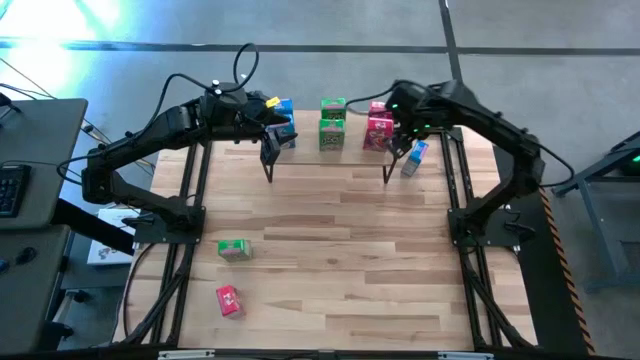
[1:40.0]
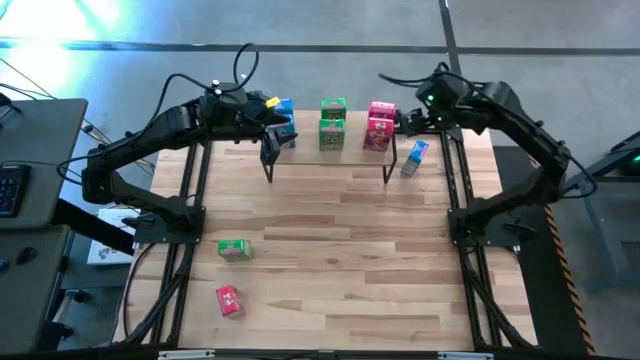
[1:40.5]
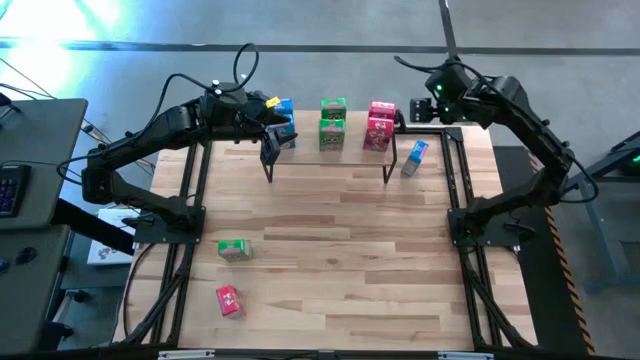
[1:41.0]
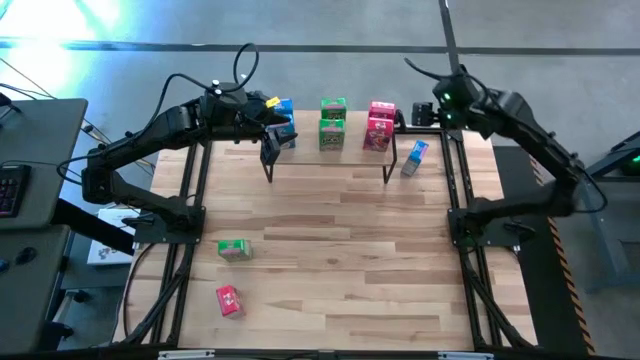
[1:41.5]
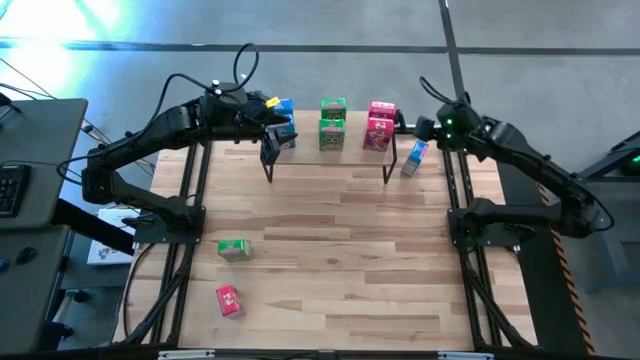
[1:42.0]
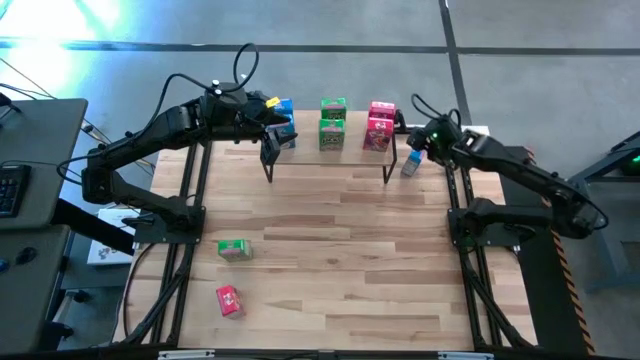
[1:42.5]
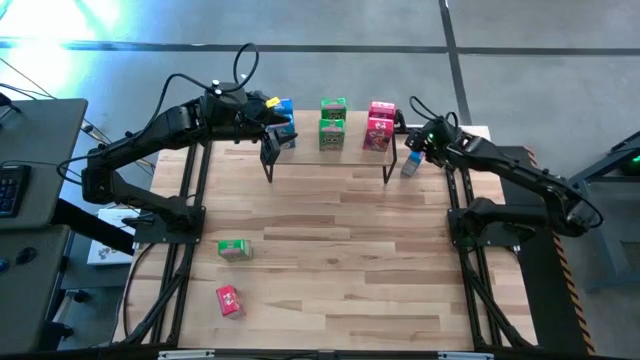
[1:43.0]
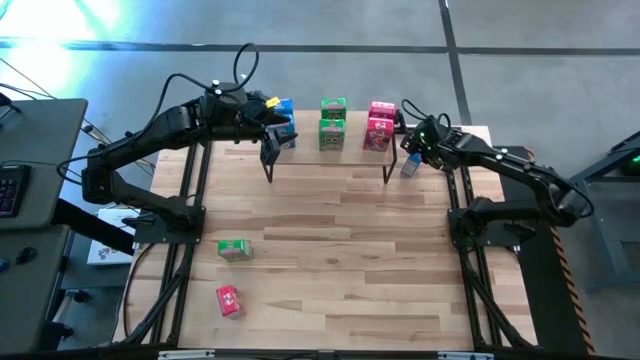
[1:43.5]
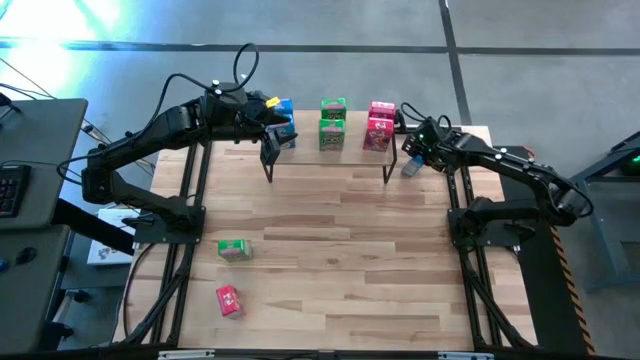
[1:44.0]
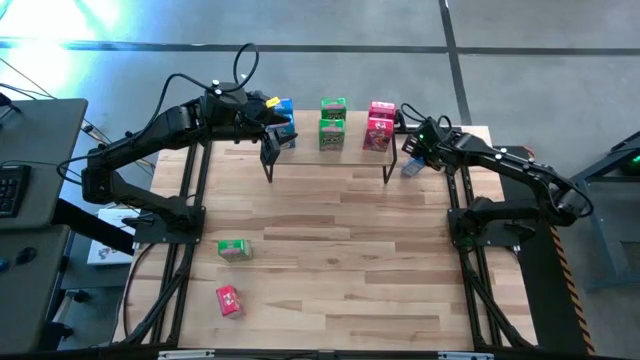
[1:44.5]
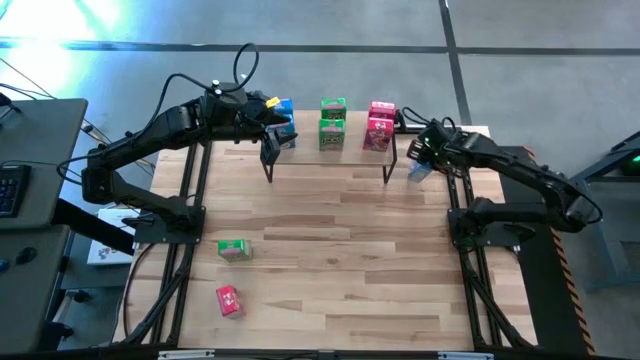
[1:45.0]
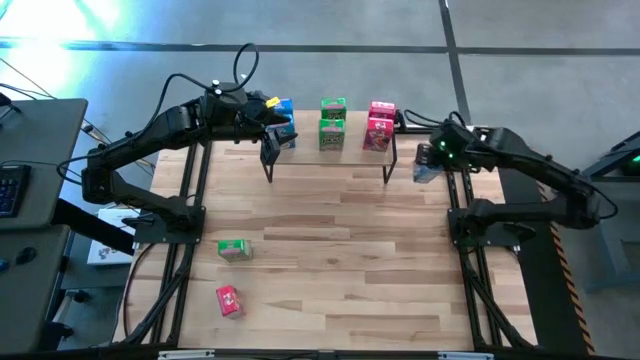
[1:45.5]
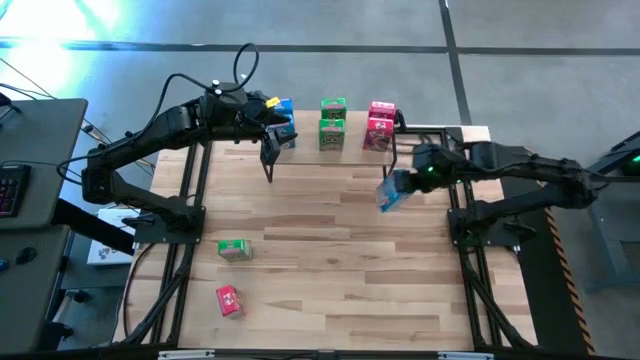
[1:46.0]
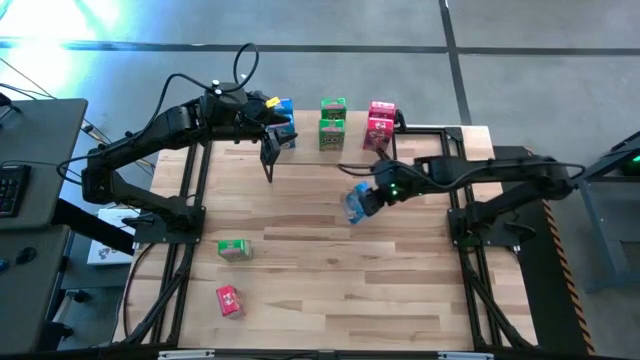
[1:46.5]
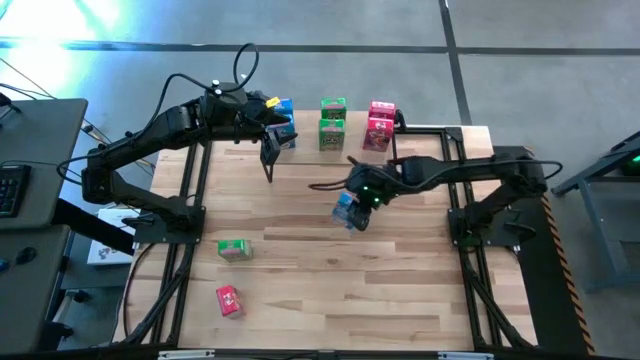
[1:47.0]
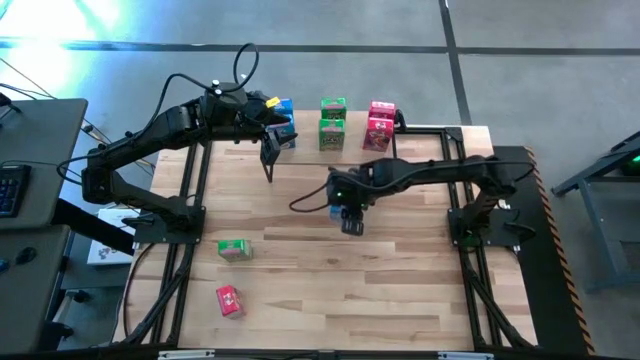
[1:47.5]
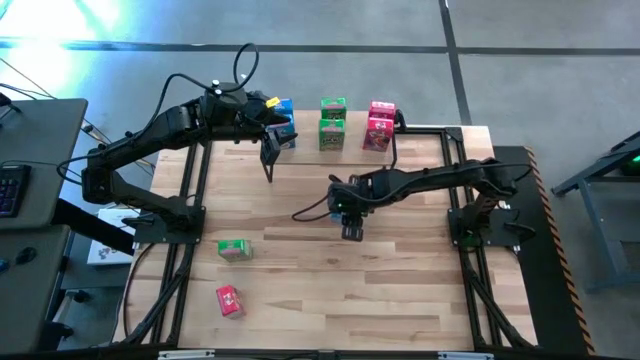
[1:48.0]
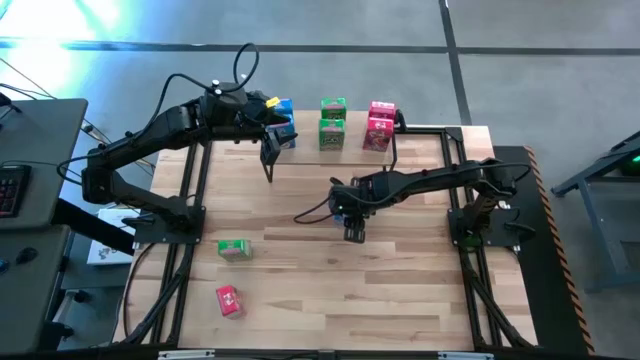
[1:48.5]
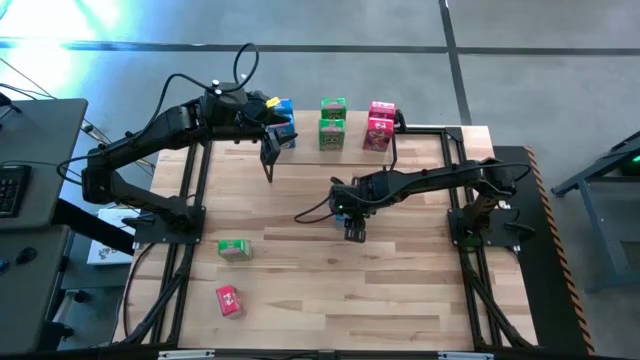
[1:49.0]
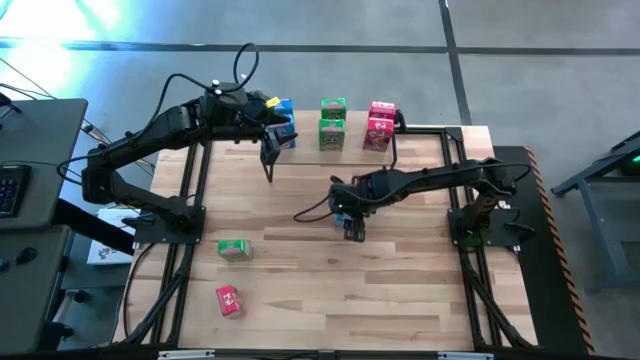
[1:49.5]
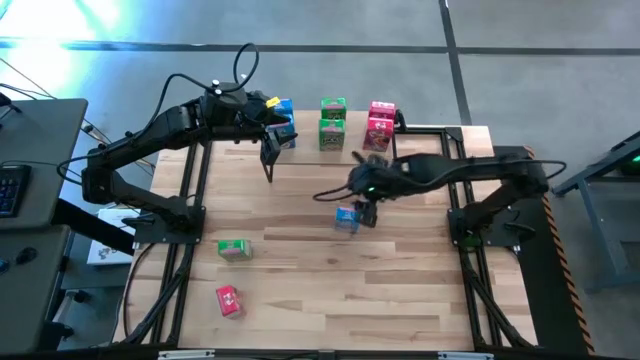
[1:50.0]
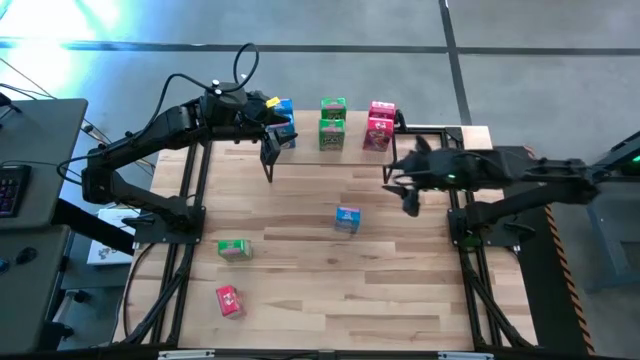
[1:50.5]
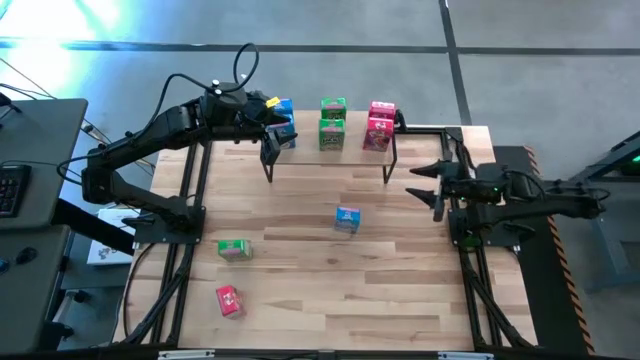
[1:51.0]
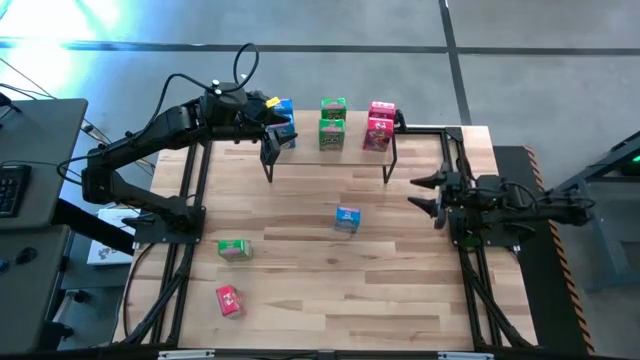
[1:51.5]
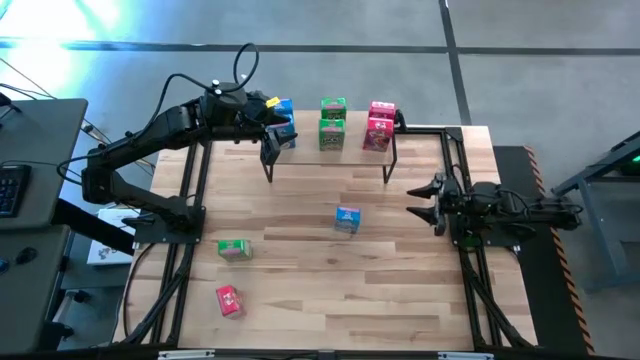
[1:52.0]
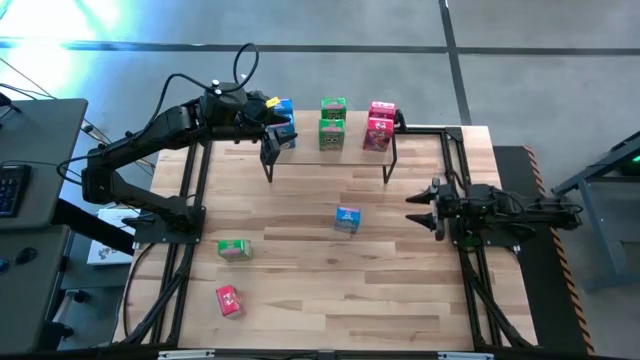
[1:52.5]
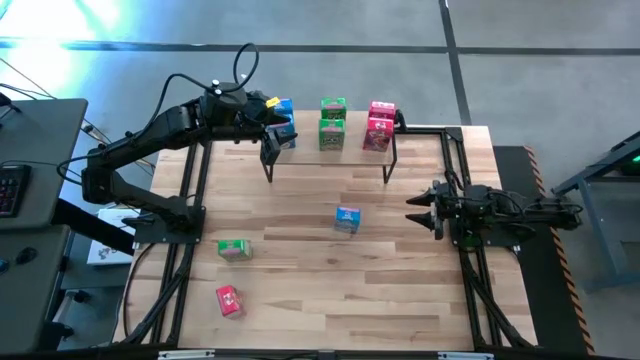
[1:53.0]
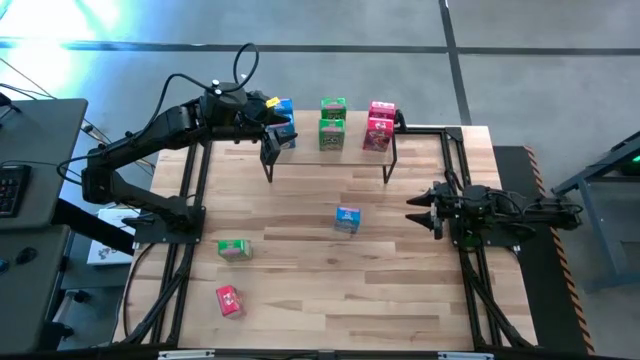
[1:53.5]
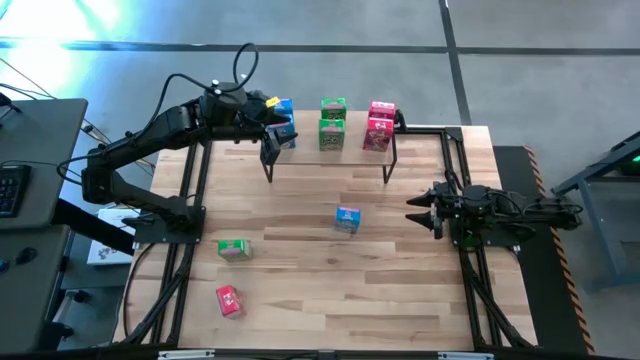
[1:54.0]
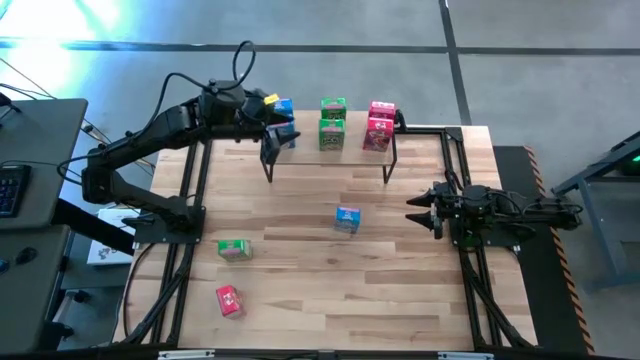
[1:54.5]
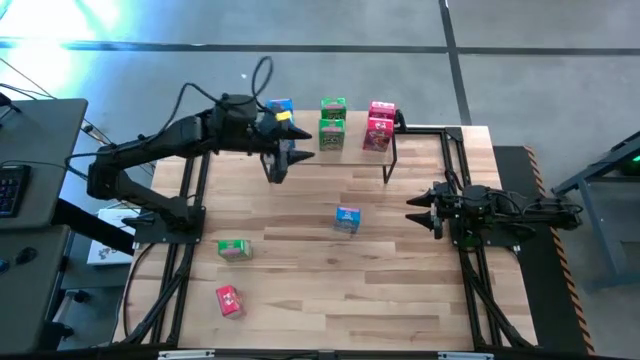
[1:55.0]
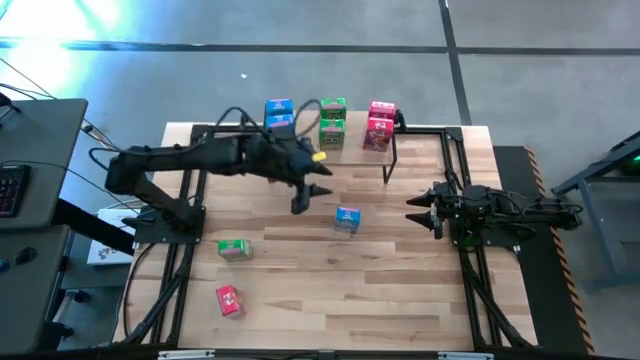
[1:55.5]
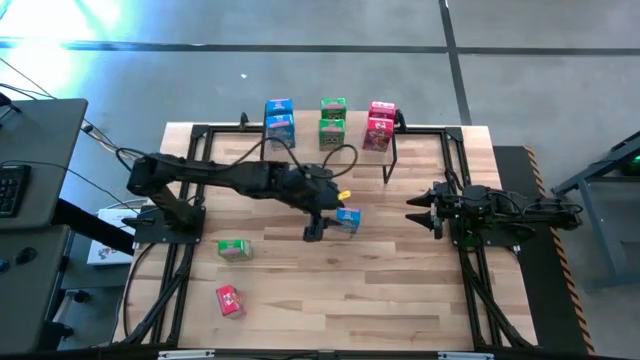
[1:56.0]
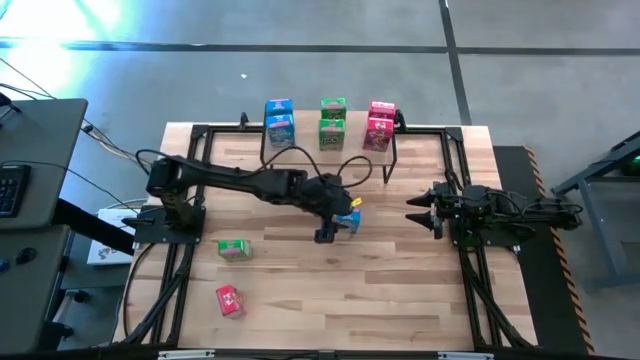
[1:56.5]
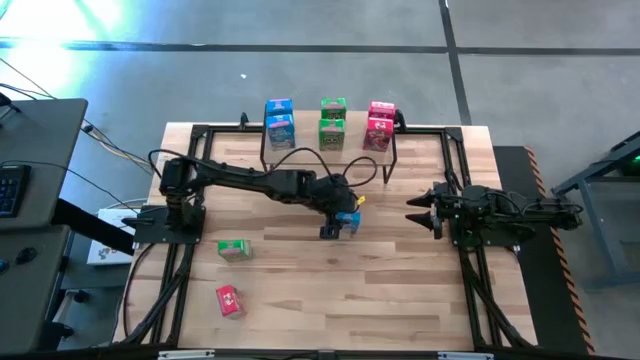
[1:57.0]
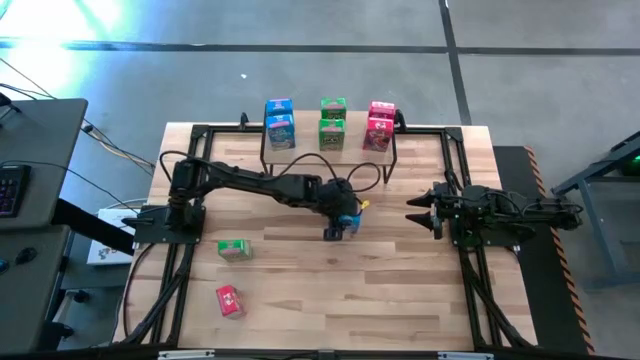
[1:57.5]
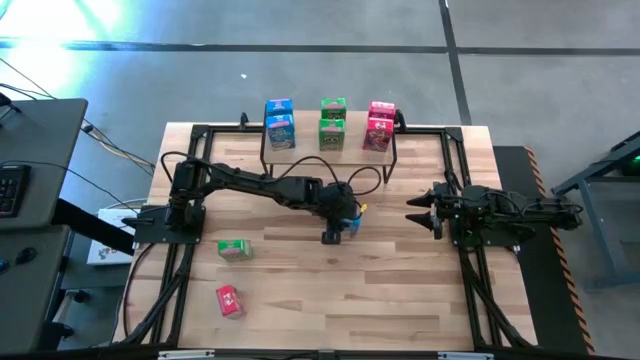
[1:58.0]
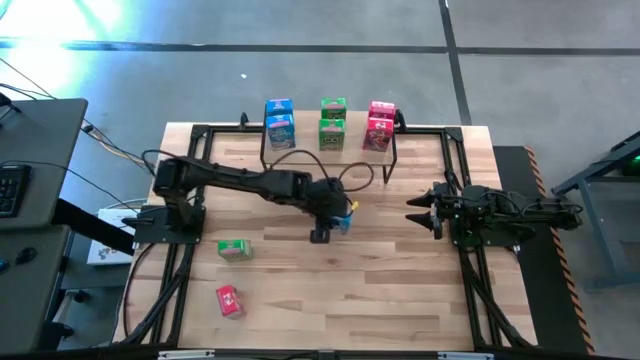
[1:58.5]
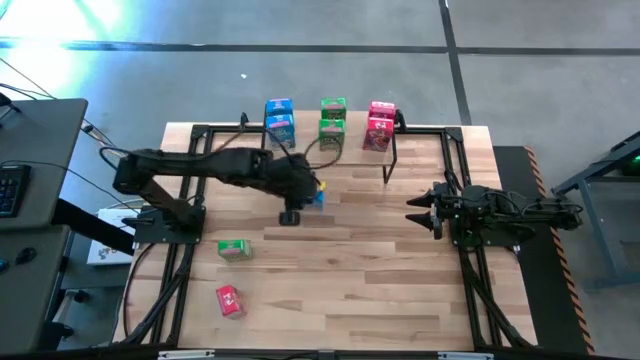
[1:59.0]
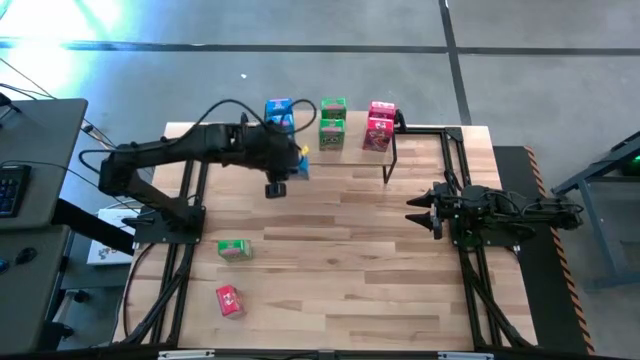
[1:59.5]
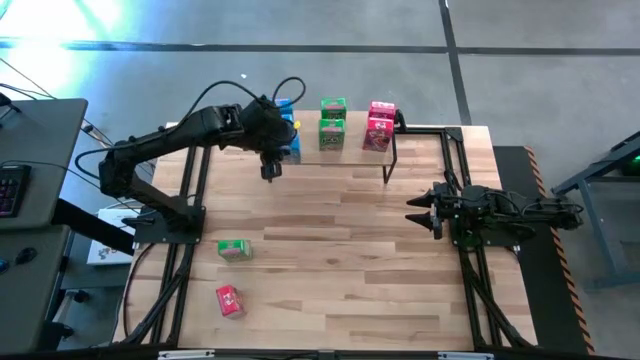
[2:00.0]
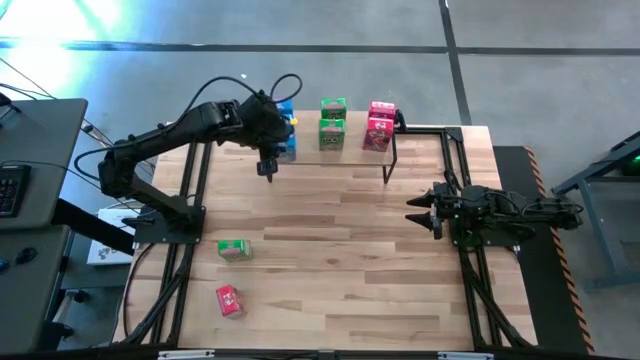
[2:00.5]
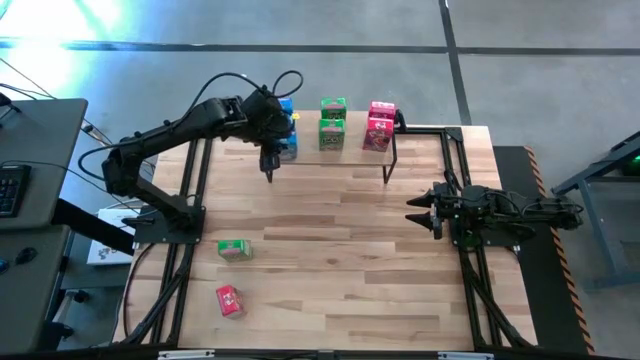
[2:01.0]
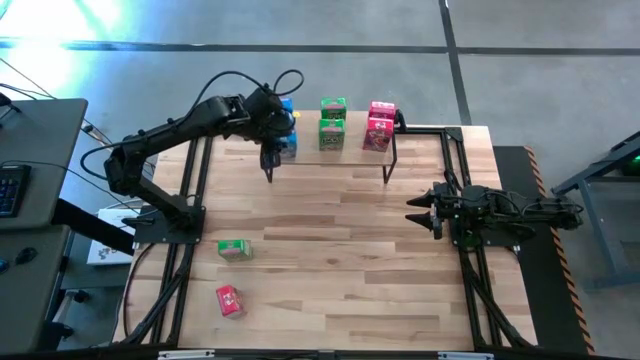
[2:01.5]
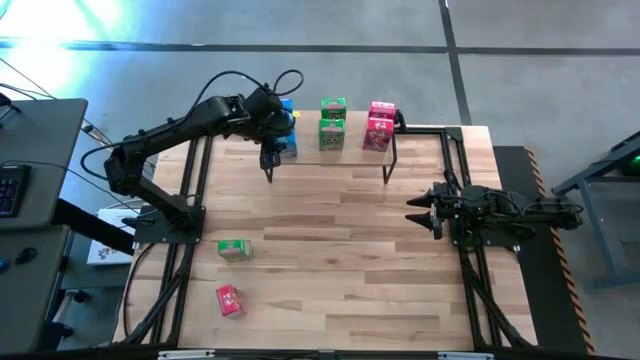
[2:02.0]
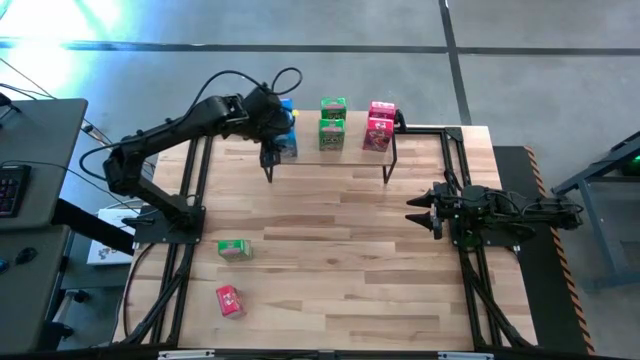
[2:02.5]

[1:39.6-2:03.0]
Task: Stack cereal on shelf
Put the blue cereal box on the shelf aligned with the other blue cereal boxes
